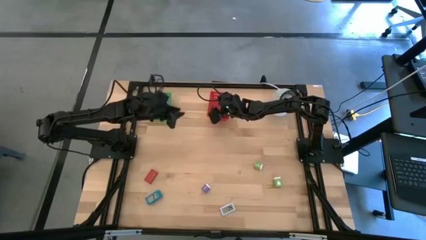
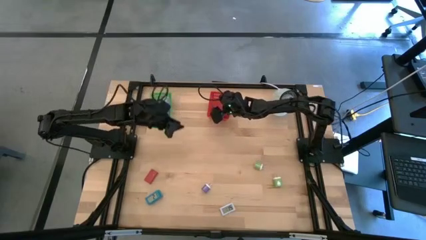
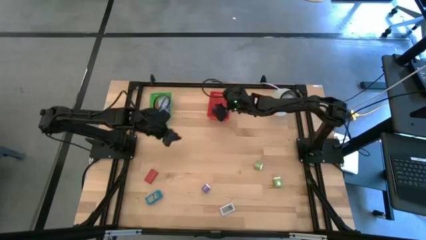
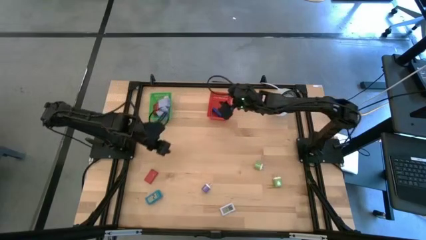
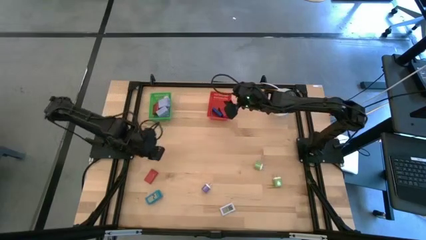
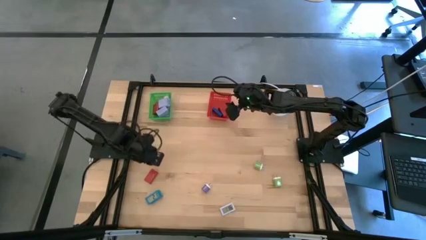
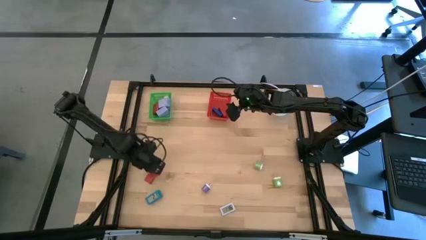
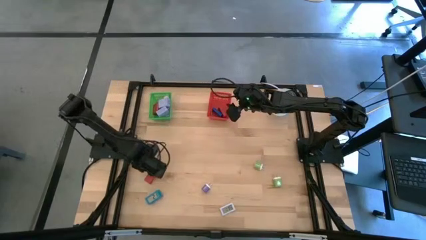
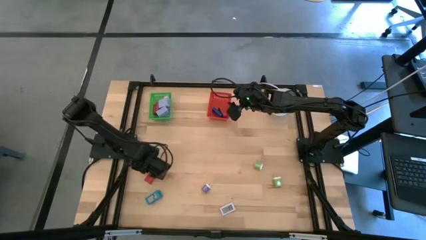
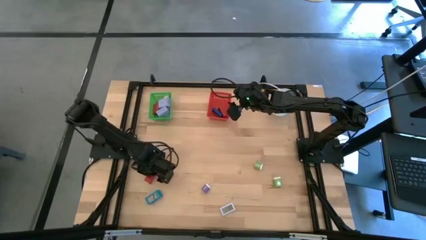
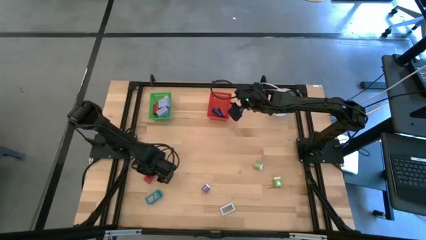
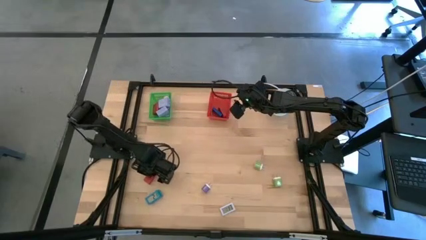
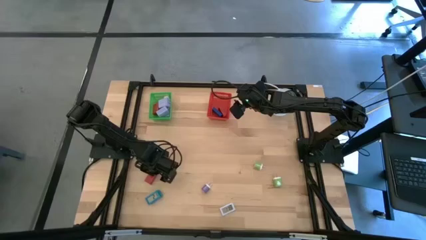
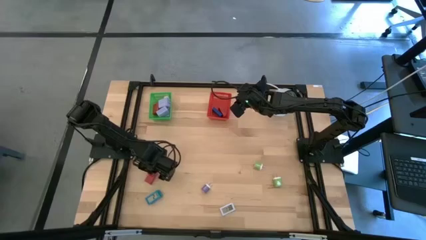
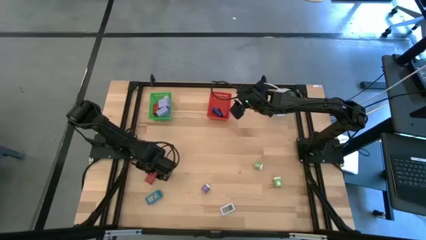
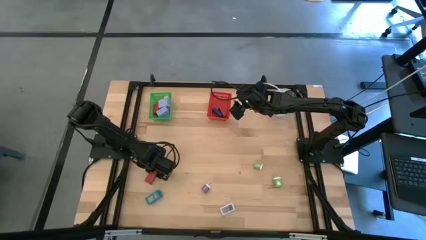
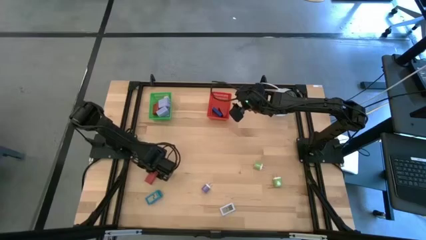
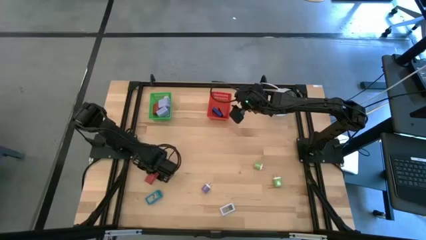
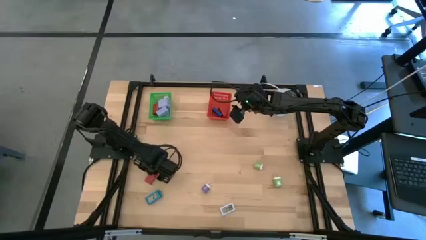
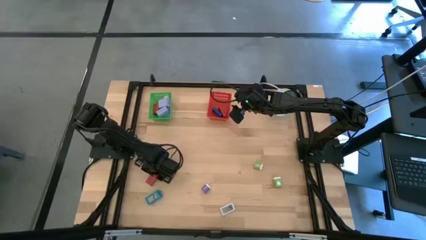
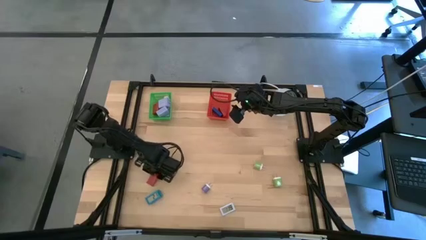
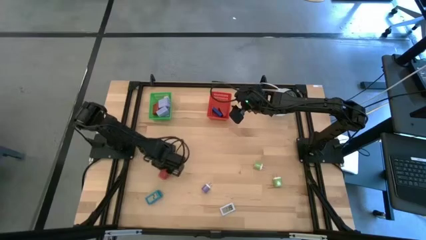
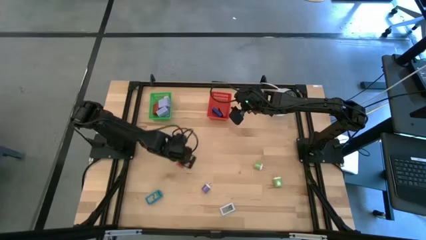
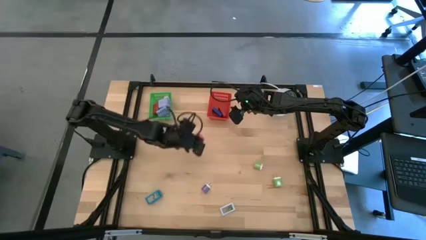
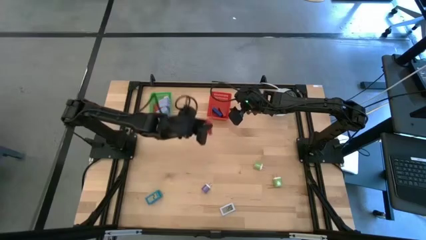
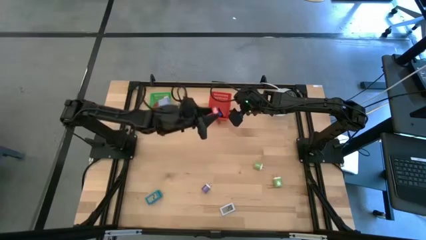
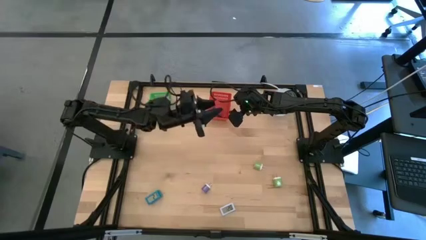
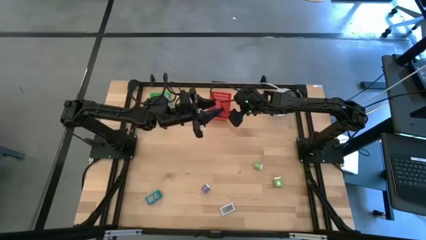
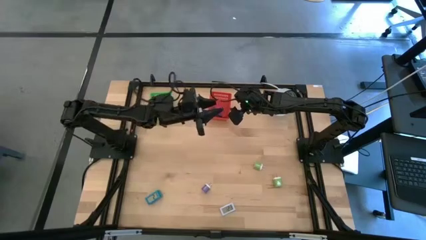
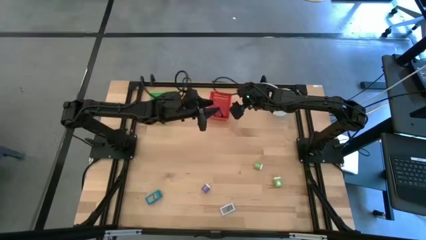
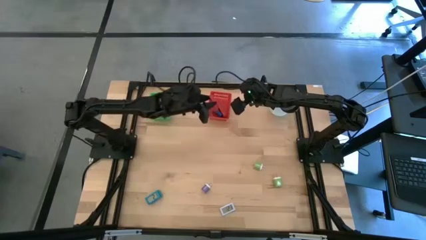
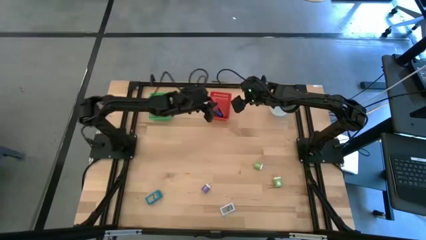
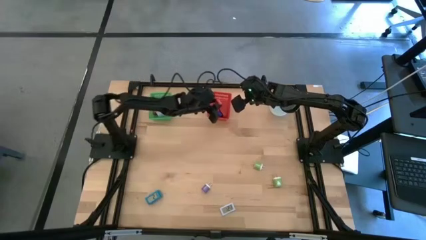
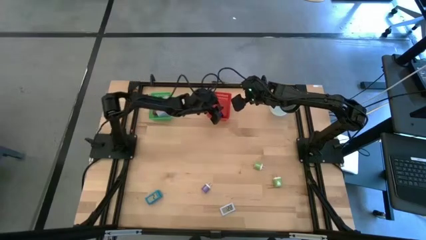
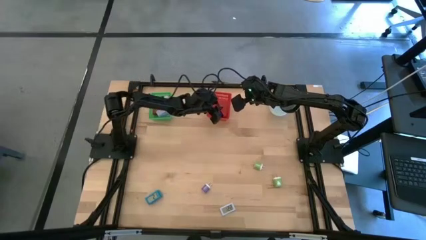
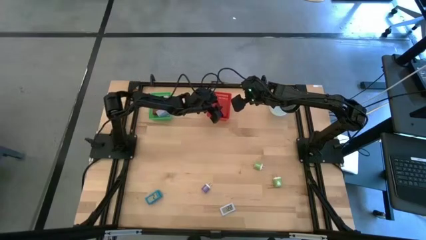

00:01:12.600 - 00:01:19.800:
Task: Pick & Place Office items
Put the red digital timer into the red bin

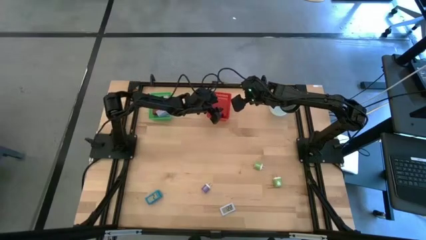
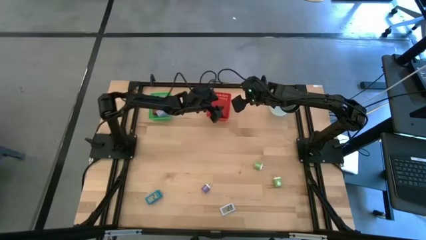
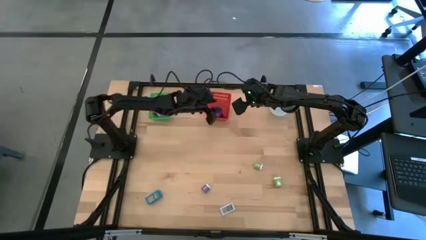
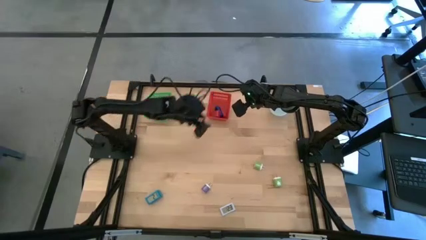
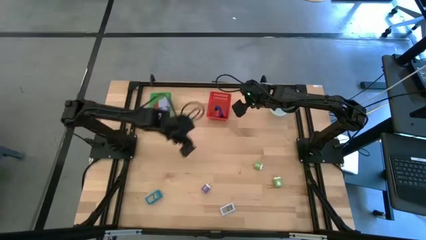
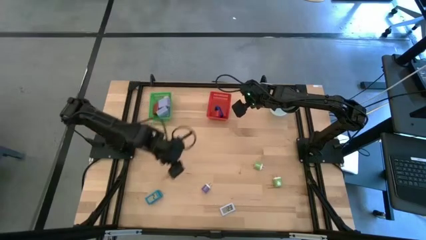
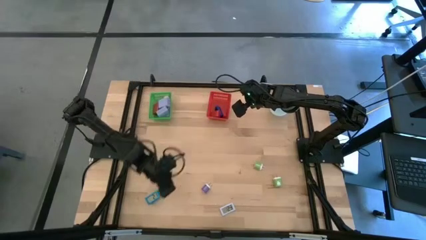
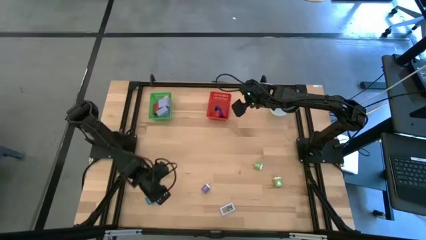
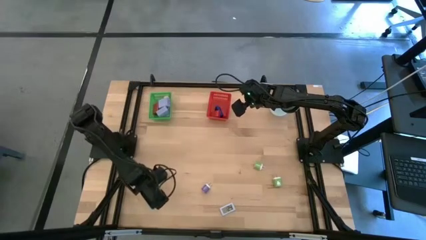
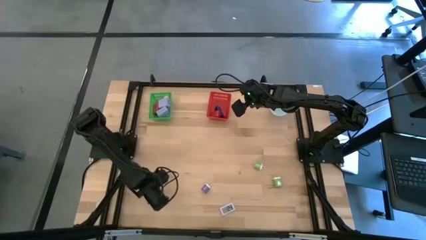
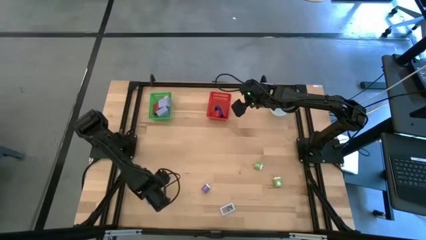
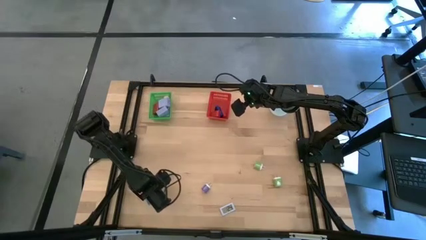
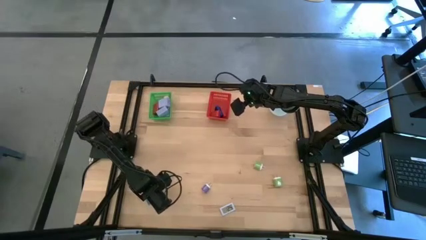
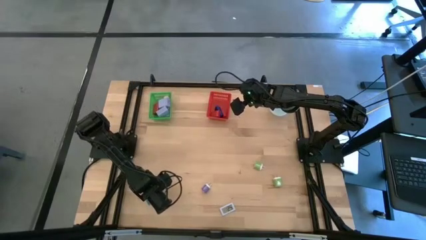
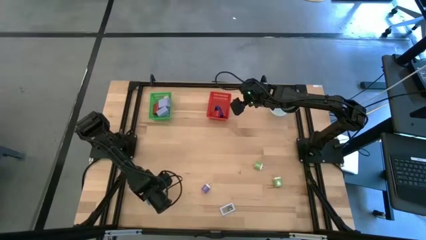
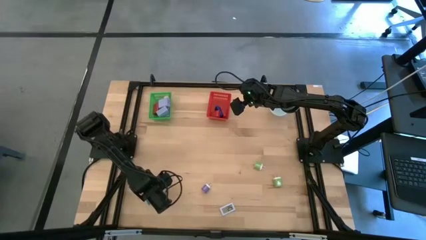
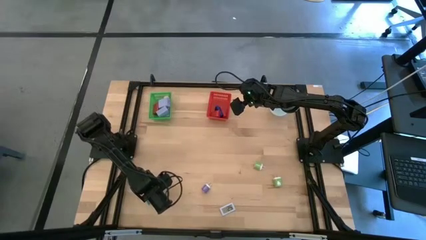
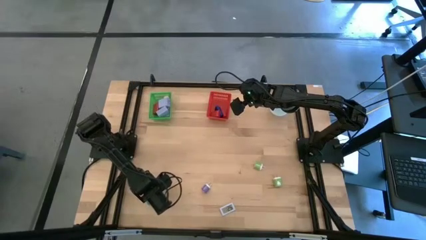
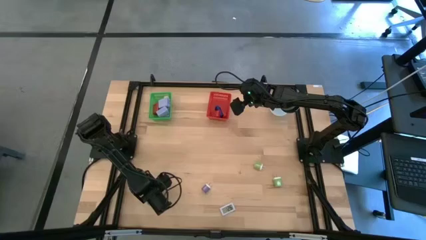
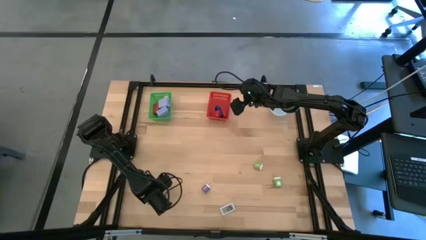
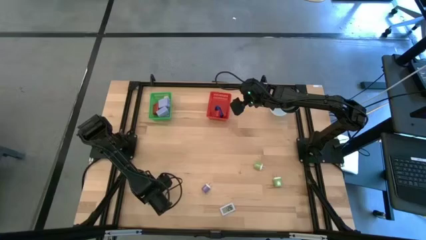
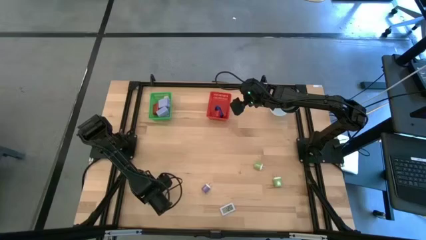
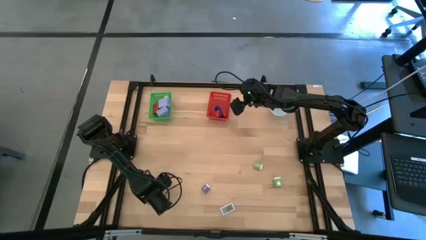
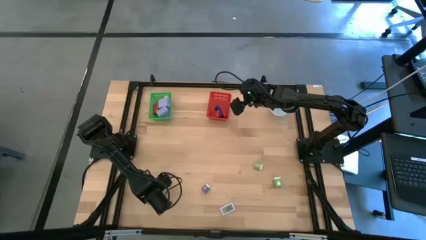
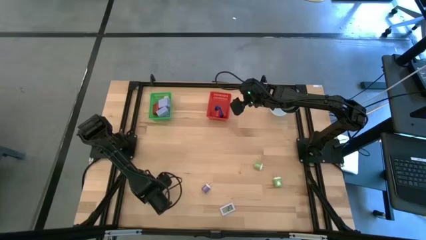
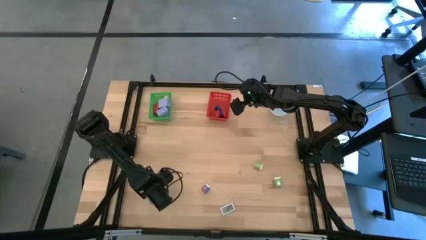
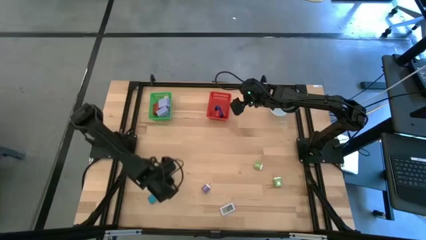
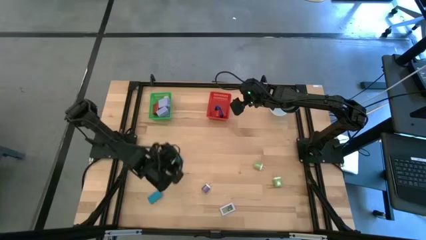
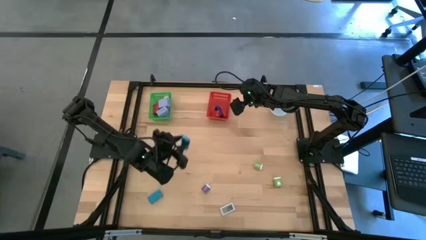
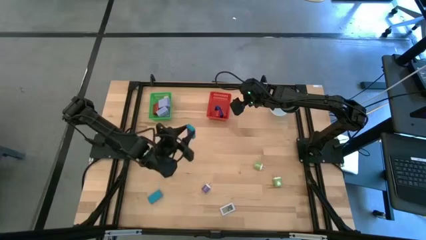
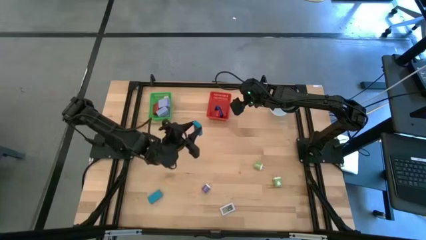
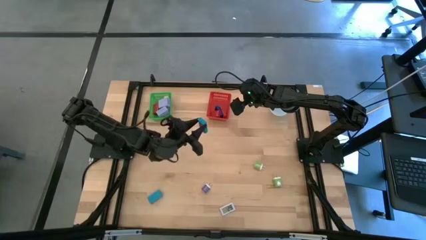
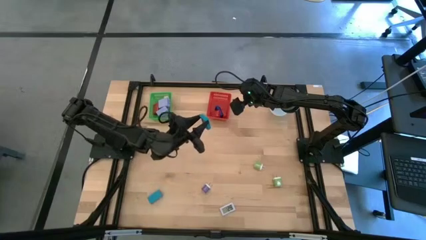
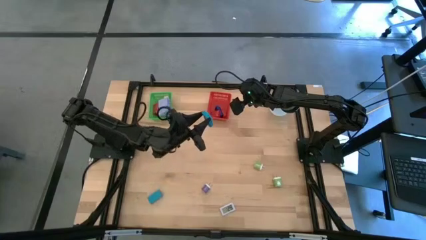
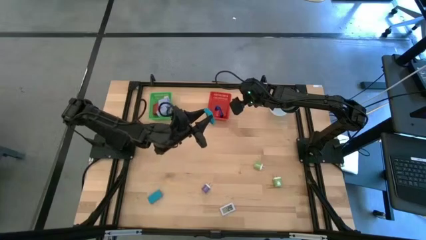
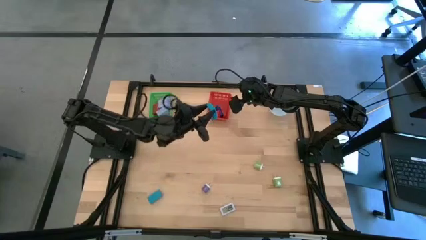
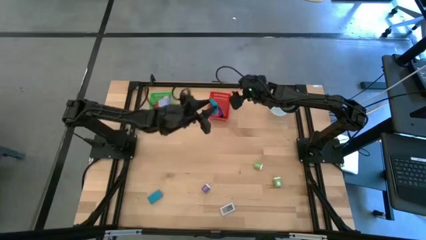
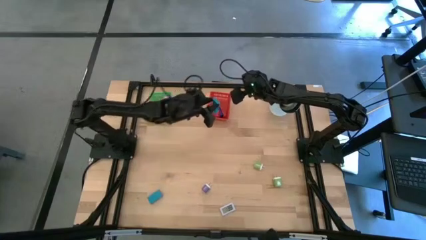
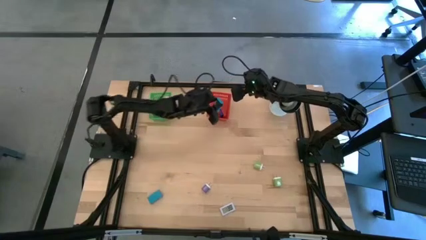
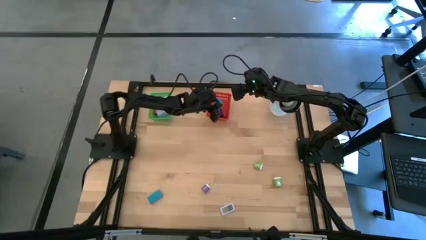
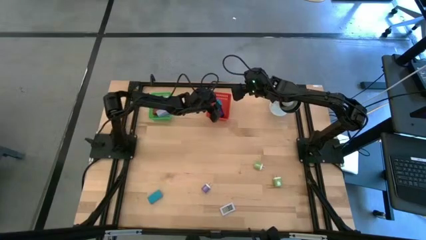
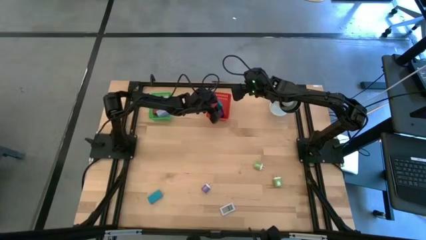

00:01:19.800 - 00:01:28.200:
Put the top light blue digital timer into the red bin
